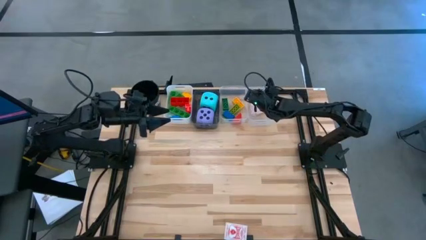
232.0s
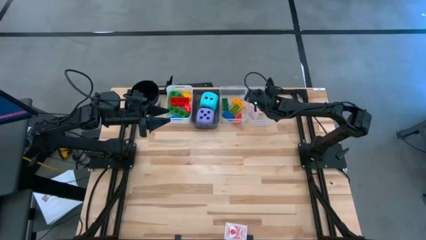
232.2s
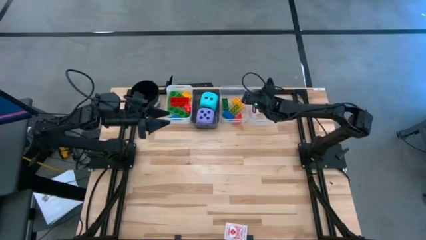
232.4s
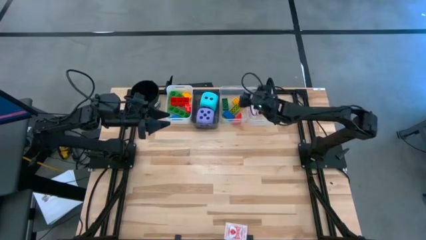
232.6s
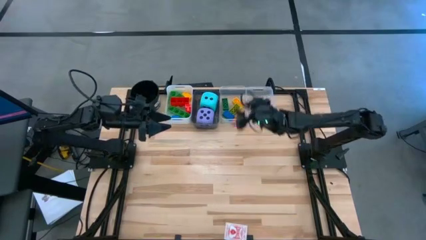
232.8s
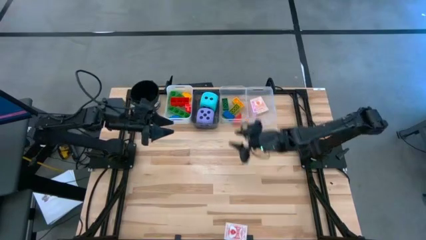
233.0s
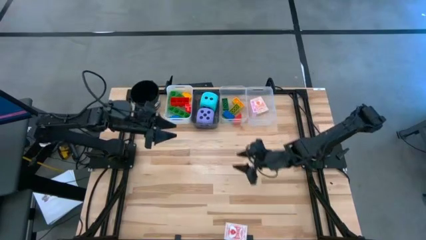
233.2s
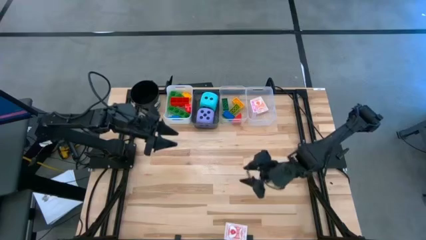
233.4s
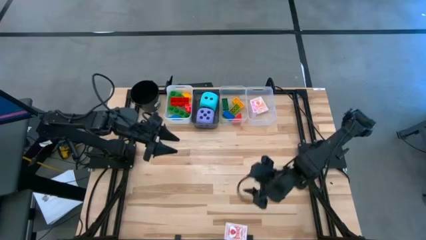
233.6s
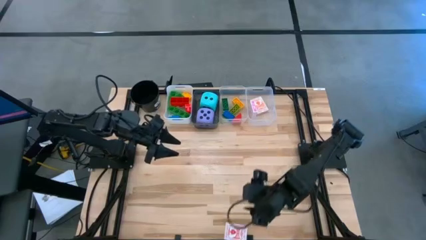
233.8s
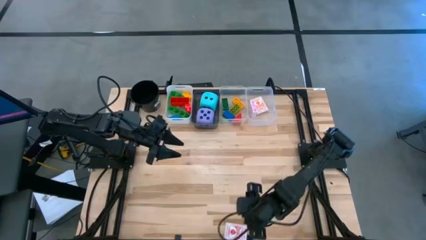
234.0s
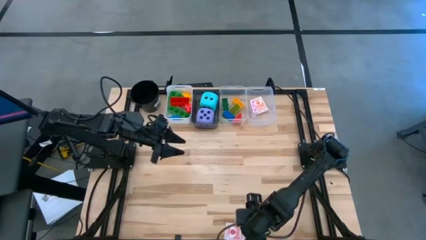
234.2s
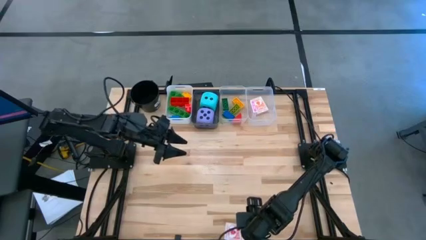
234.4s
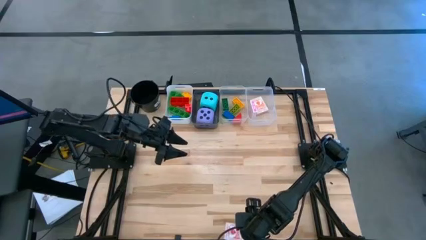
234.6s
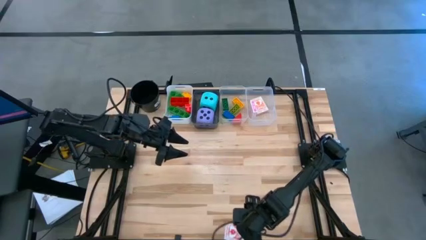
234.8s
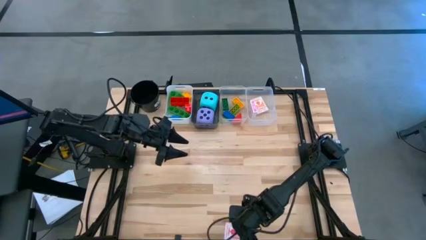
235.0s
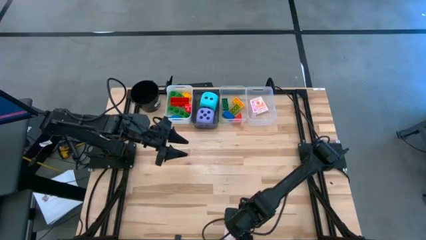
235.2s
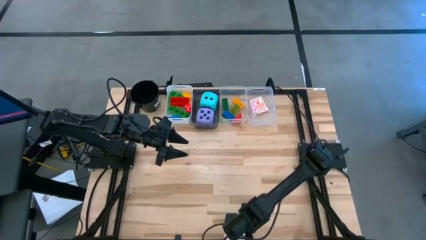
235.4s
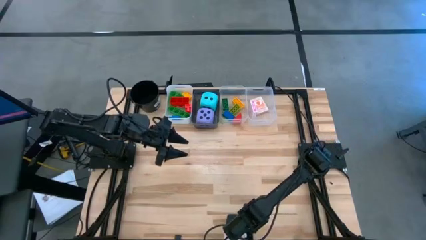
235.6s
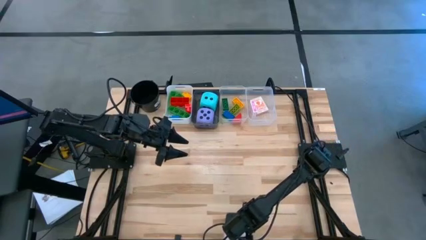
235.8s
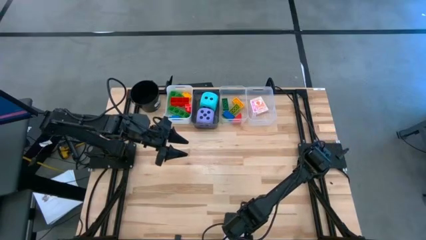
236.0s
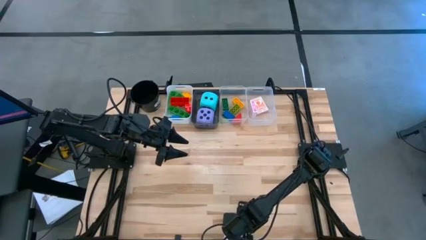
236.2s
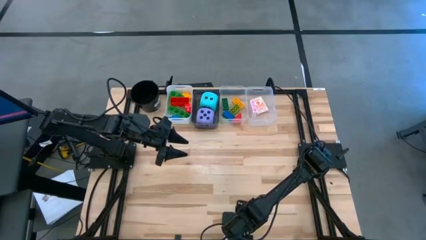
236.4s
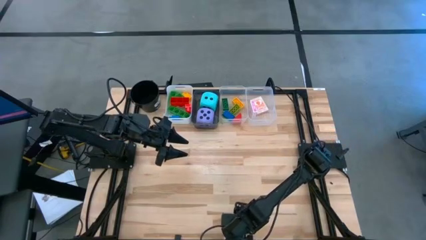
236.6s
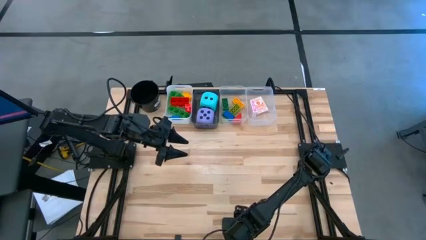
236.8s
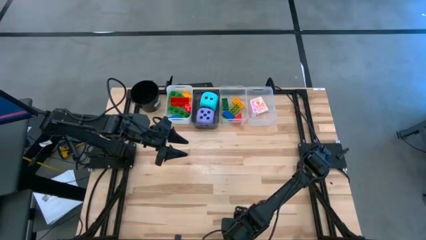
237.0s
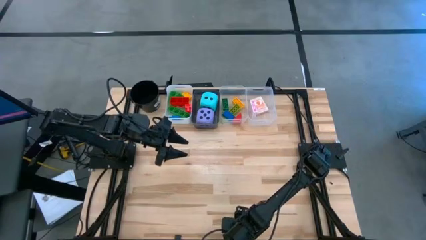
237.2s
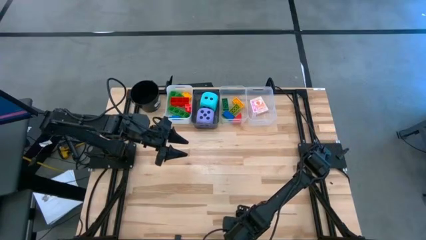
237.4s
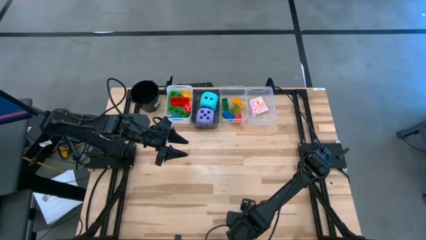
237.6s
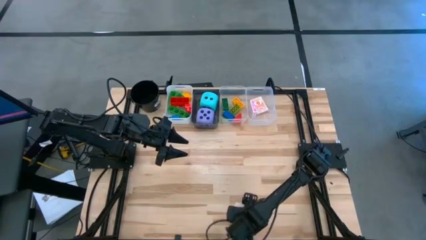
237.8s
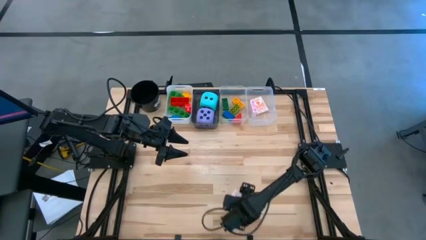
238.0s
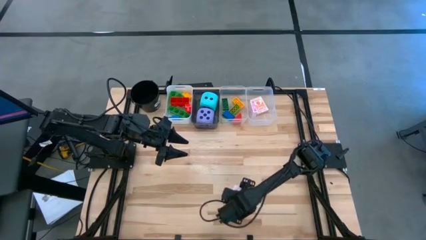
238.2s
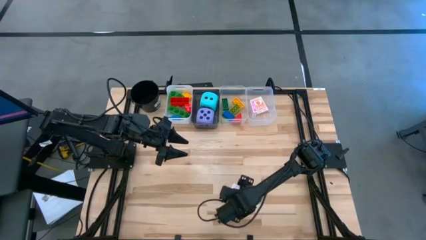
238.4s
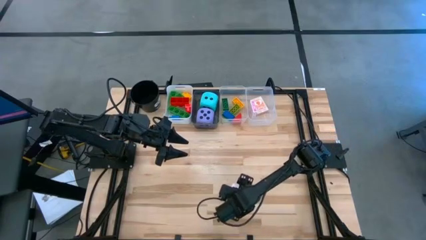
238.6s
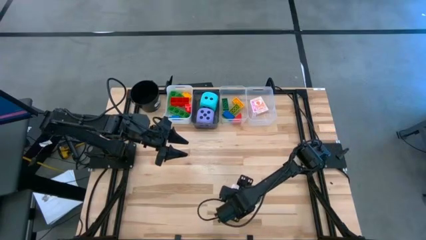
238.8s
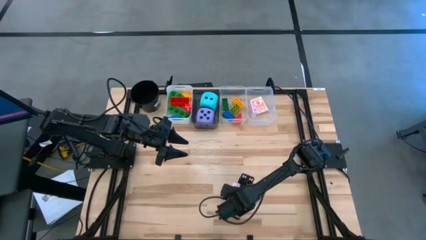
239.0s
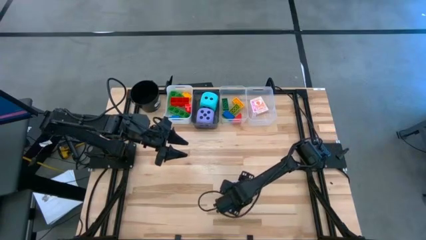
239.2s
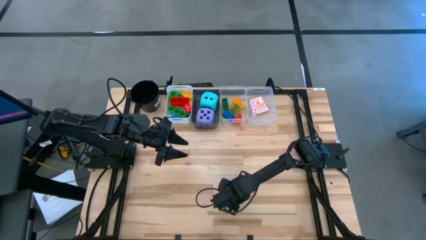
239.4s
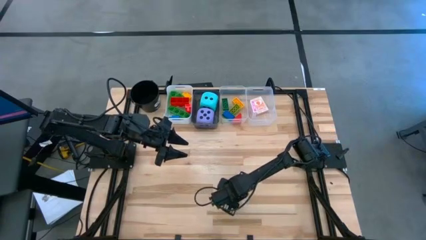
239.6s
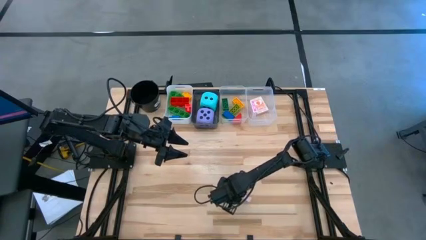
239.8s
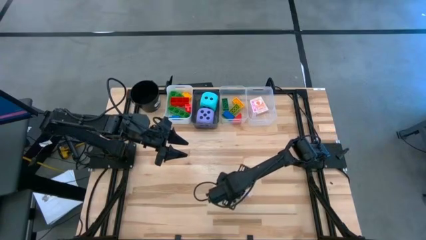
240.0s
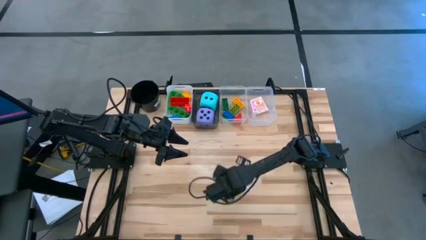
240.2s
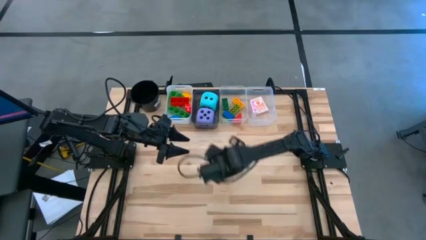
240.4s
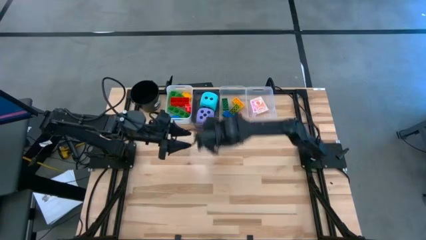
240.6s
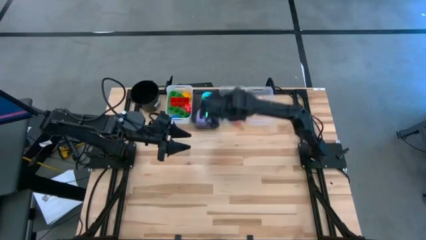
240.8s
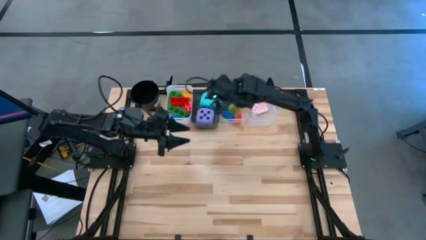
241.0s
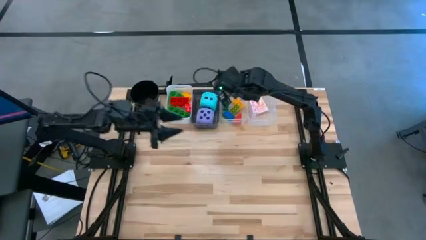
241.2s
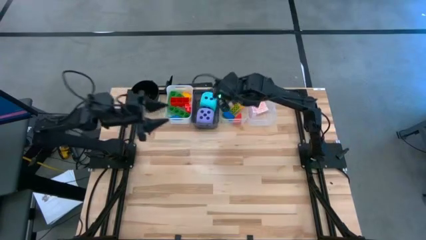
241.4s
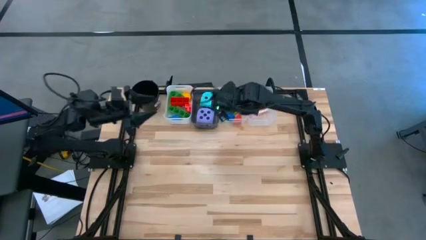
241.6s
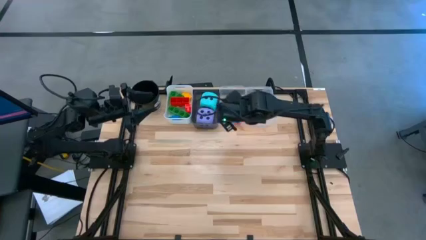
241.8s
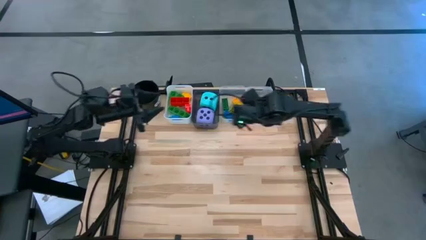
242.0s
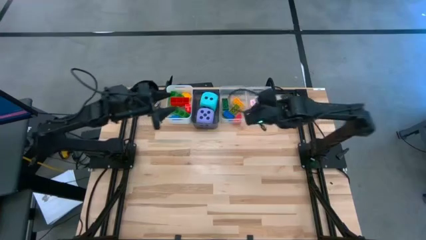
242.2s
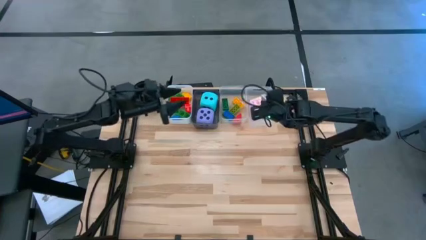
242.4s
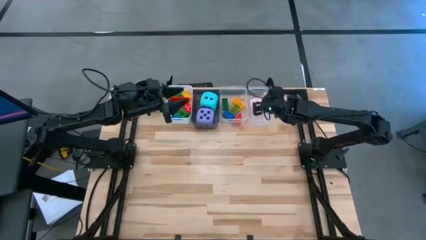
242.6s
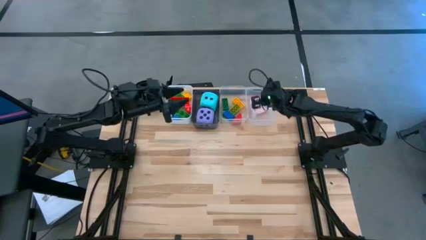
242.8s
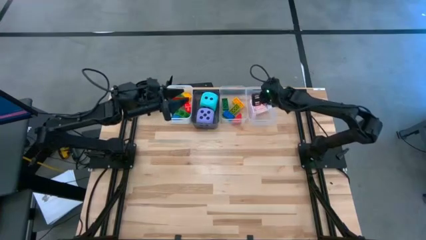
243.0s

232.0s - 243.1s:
Task: Pick & Place Toys
Put the red deck of cards into the right transparent bin

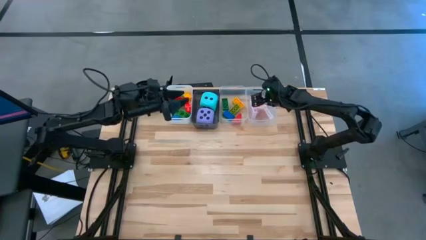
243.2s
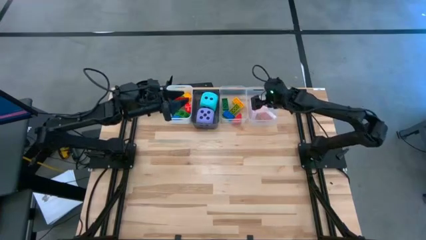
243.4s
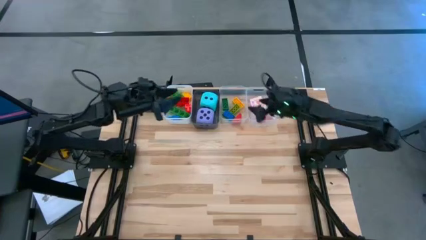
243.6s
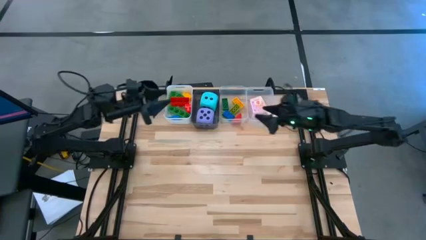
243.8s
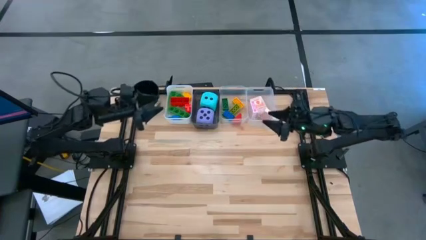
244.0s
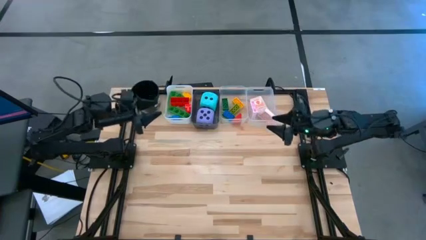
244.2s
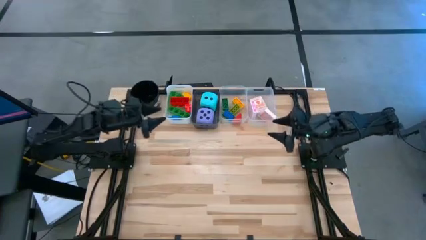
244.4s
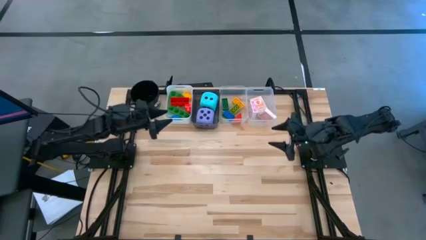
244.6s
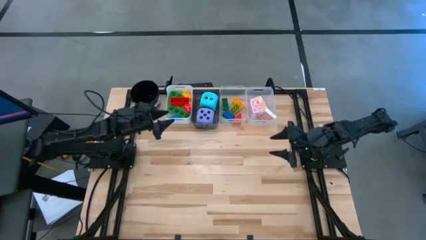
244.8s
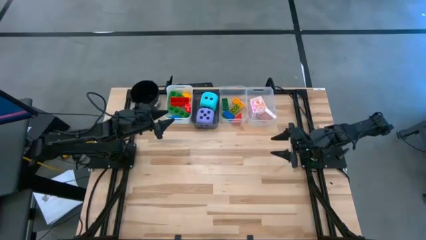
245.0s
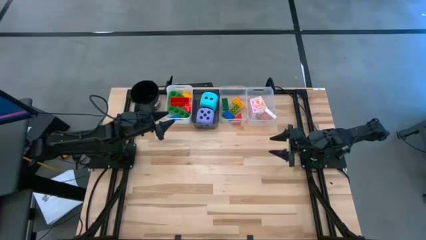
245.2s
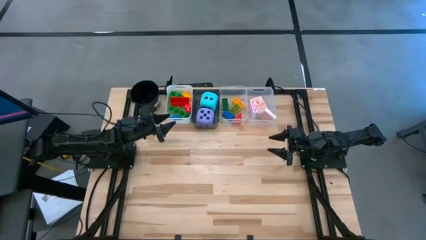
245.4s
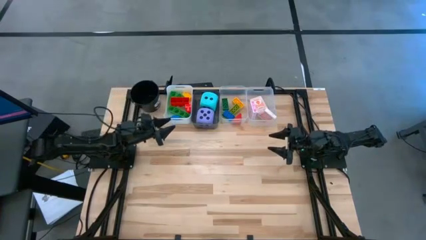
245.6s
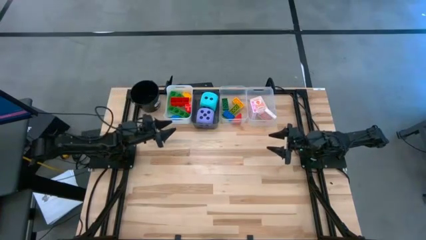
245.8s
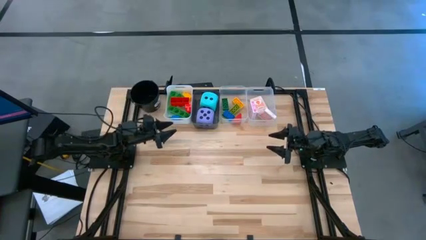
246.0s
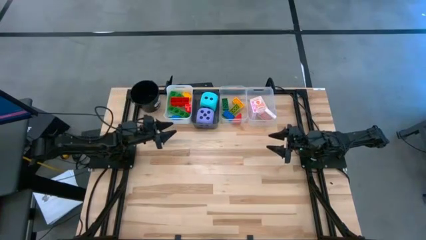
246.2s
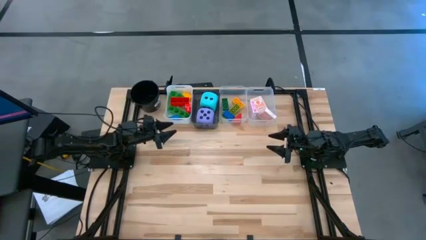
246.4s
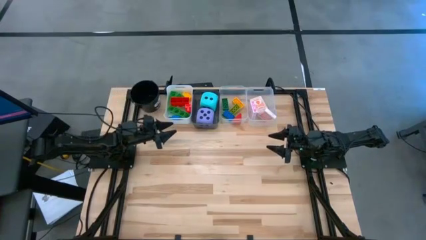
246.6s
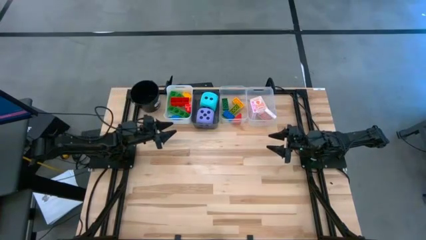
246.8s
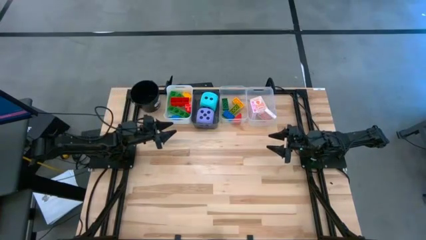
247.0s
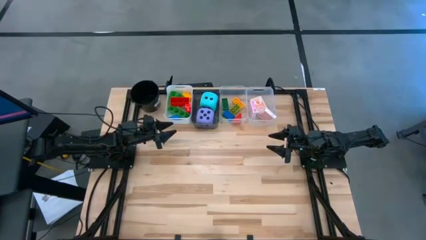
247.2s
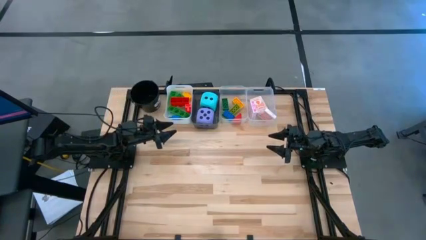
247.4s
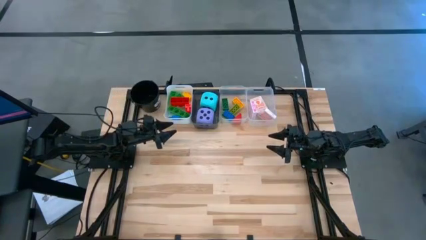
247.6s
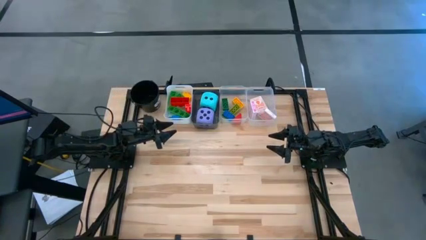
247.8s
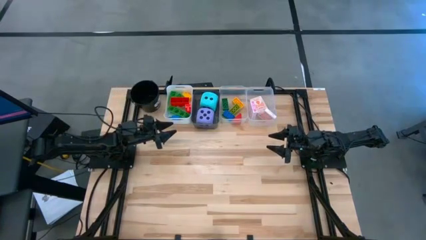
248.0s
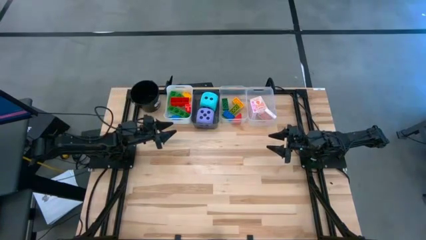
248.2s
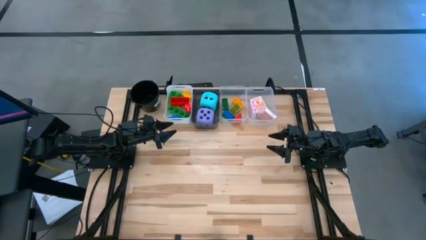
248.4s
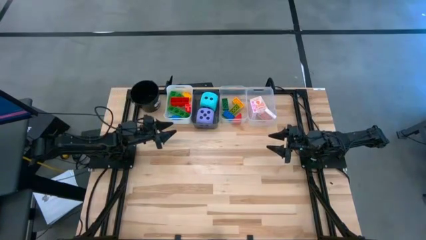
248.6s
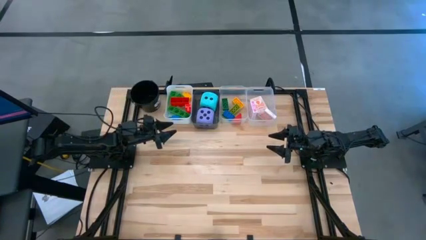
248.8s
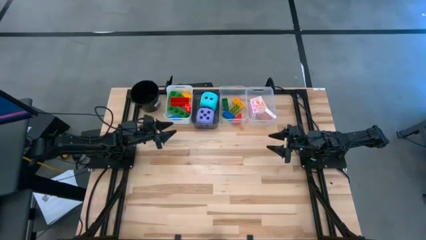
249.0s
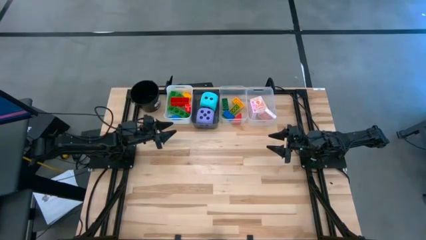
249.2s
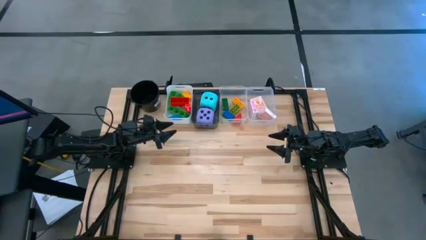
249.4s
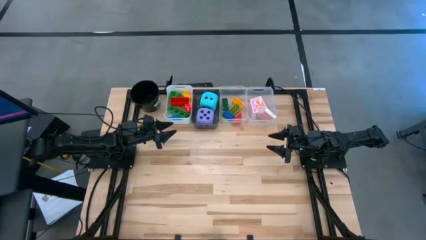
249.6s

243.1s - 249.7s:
Return to Home Position
